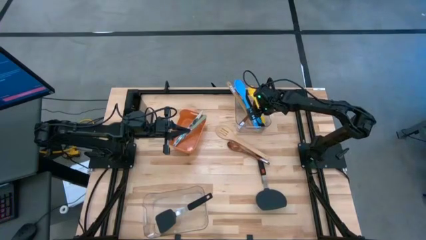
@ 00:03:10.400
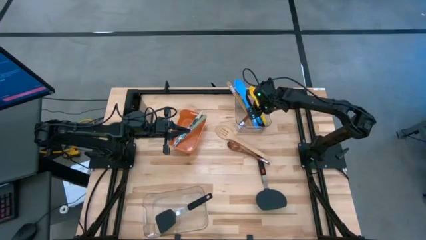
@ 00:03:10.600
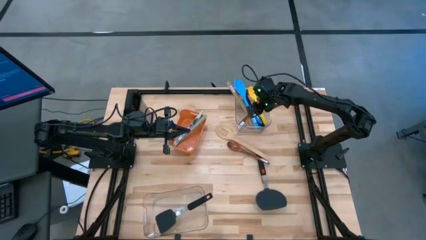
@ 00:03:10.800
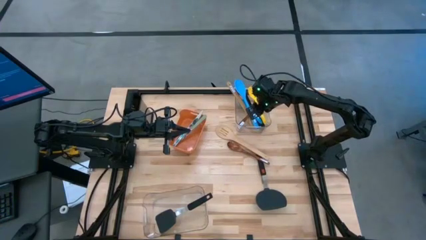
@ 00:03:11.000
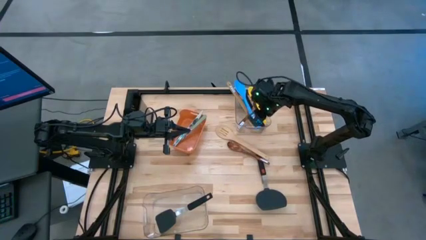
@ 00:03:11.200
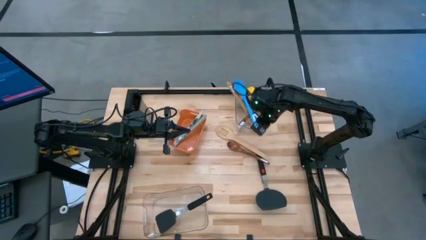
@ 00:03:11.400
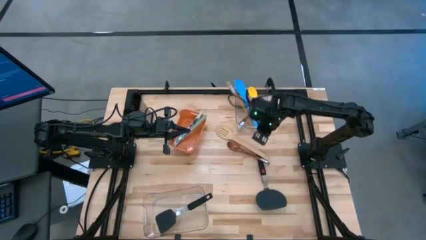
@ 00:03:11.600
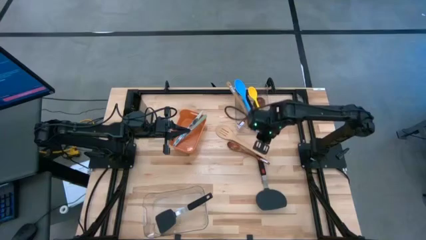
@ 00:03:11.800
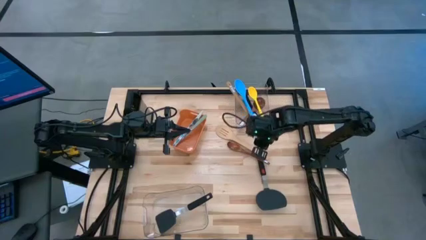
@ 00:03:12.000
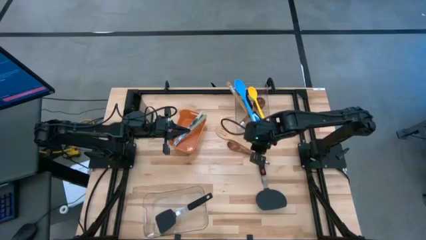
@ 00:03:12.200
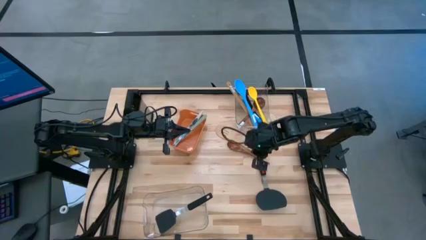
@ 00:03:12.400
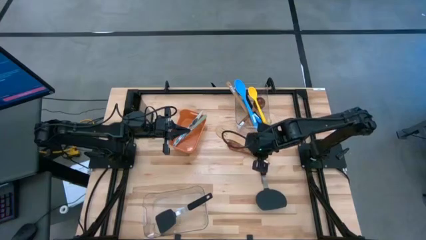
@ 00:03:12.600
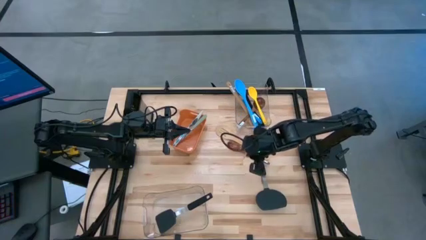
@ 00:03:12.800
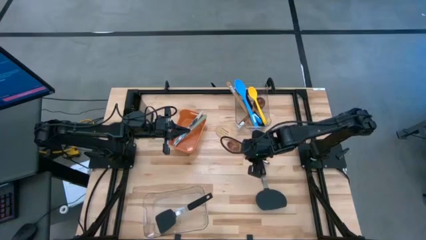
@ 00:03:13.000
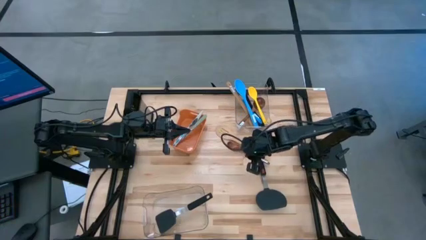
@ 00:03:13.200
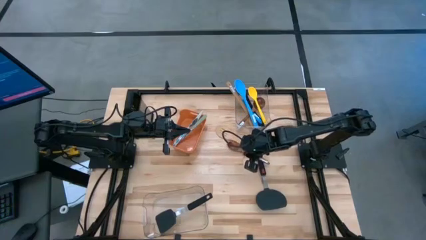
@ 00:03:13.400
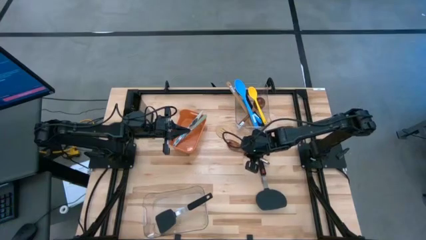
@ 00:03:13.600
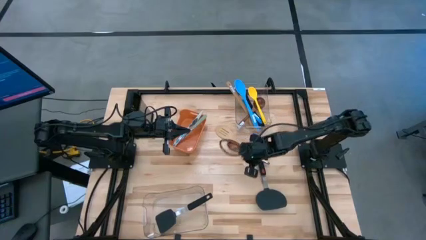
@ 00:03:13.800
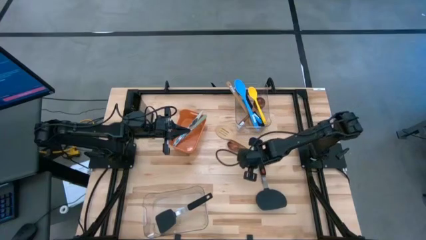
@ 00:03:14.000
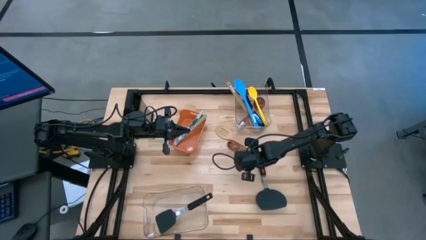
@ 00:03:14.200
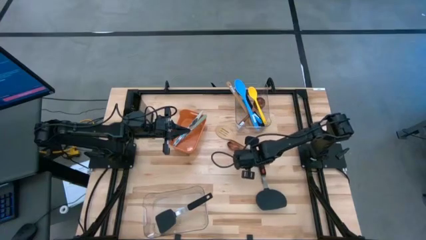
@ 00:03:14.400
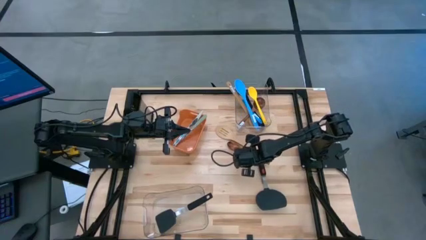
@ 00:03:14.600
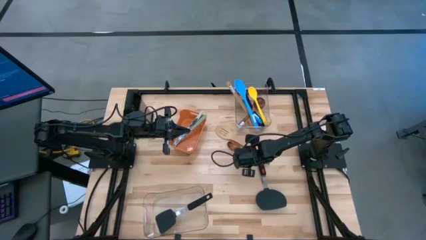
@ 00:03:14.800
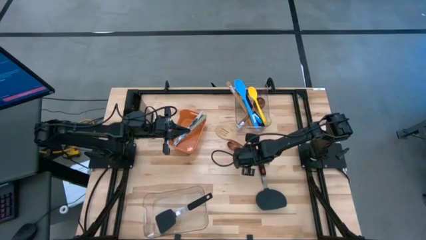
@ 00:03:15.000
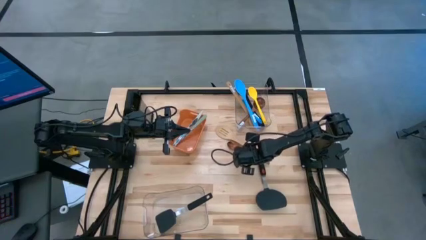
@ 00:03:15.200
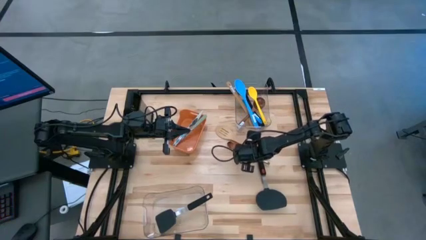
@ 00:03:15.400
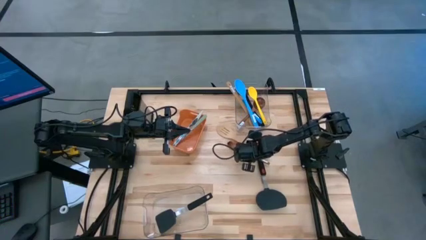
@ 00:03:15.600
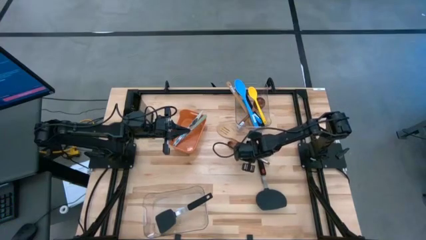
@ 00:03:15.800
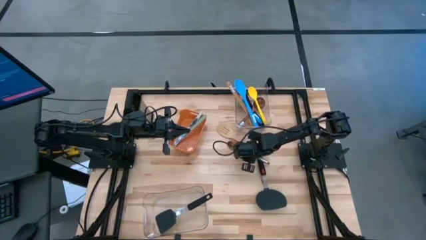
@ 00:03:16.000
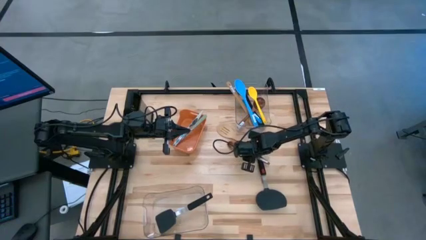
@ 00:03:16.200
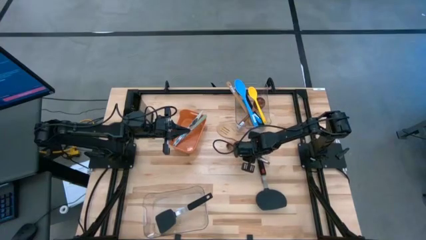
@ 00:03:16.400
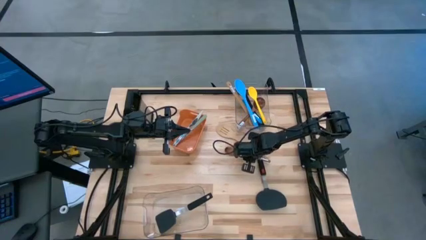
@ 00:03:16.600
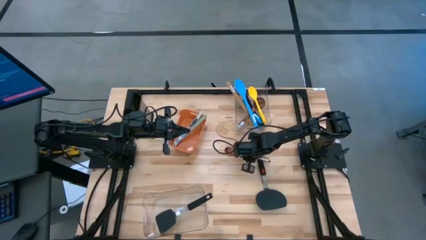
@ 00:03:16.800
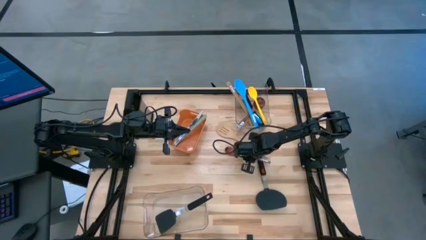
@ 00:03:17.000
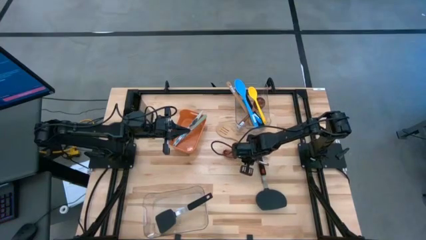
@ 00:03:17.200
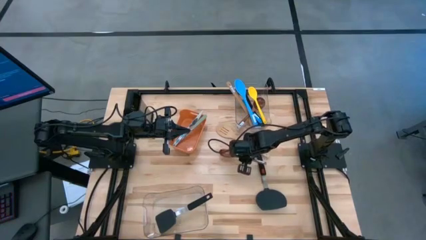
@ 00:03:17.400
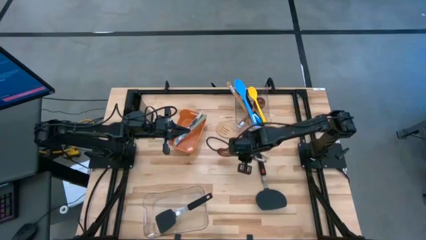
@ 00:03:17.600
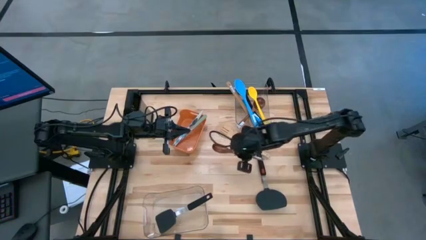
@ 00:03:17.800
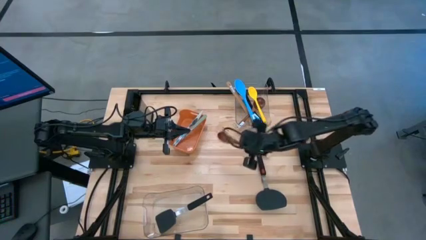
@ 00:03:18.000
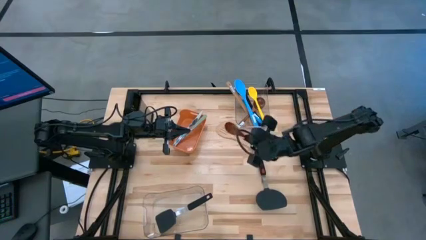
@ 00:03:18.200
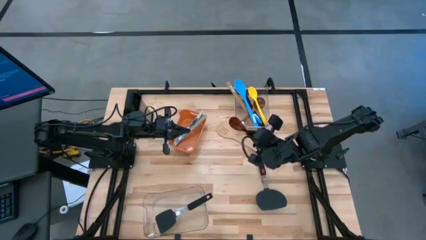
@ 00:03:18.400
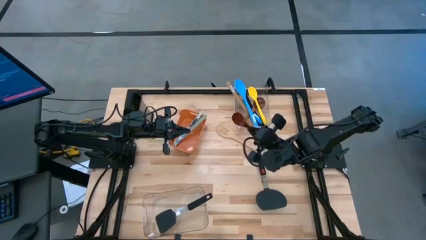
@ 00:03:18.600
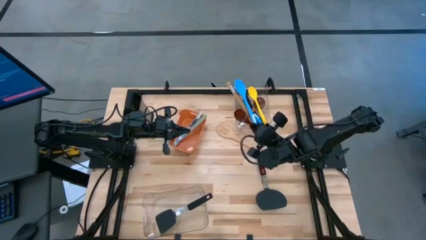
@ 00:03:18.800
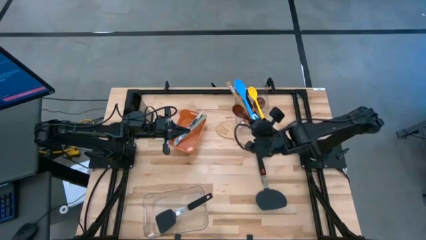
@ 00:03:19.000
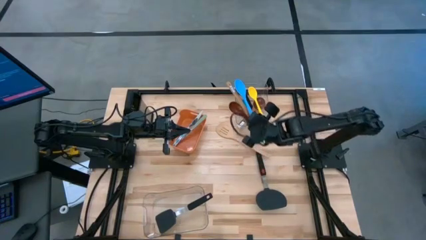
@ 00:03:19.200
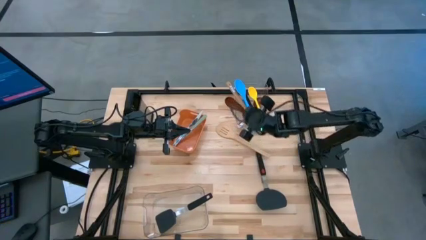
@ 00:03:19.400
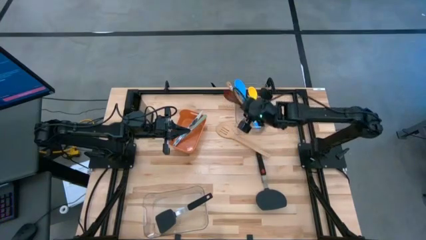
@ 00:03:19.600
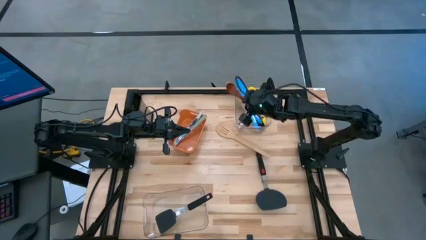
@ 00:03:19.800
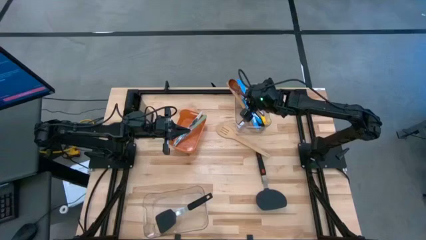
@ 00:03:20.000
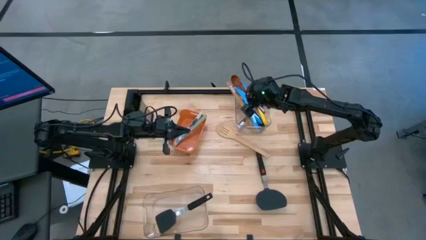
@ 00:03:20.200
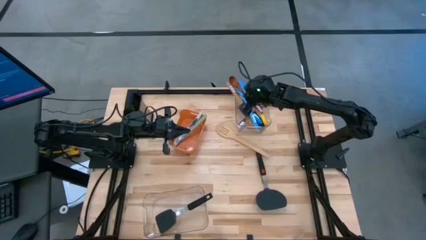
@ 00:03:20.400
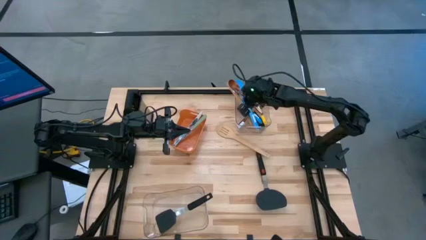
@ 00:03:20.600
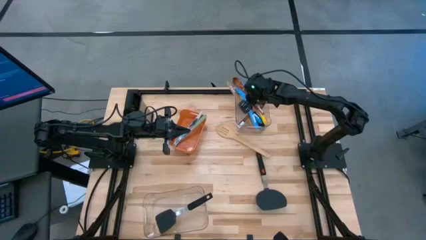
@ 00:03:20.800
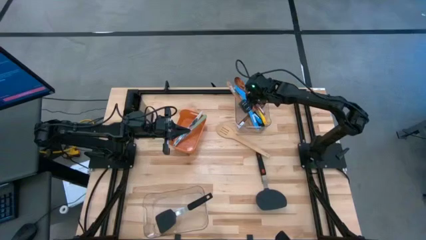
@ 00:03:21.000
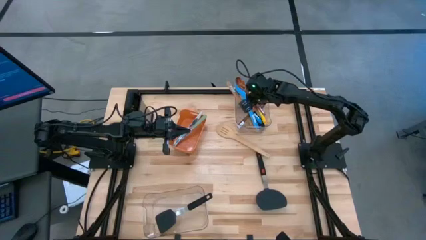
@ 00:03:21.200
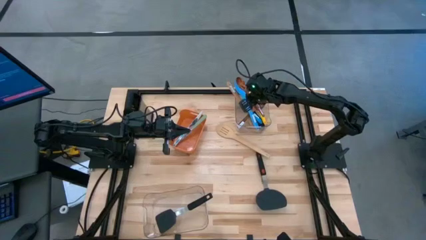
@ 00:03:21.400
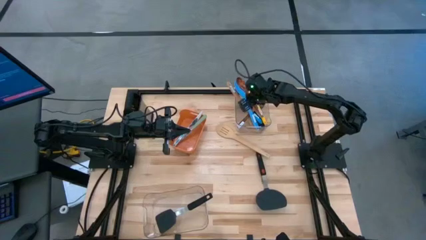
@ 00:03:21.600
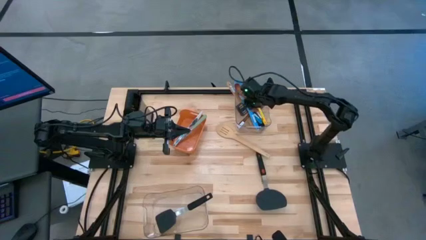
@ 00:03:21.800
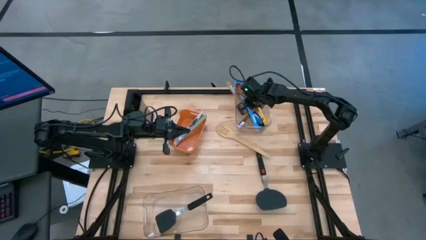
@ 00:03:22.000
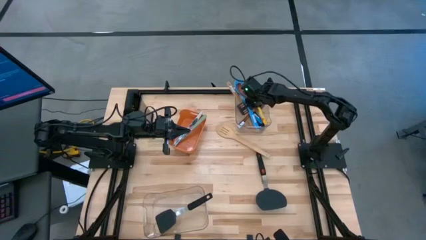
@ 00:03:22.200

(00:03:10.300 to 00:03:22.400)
Task: Pick & Place Kitchen Items
Put the dark brown serving spoon into the top transparent bin

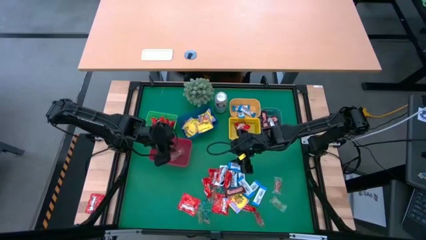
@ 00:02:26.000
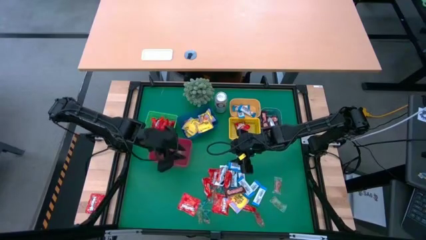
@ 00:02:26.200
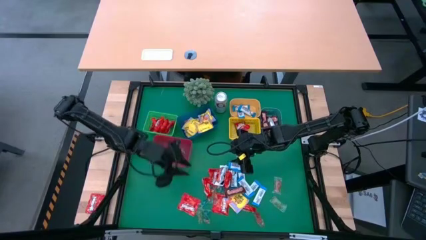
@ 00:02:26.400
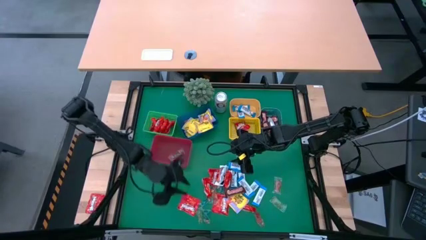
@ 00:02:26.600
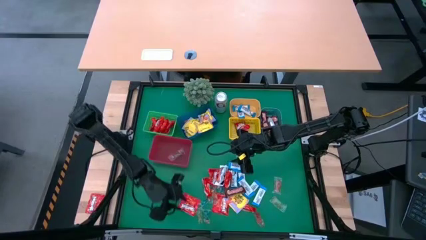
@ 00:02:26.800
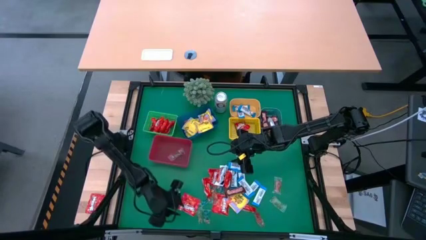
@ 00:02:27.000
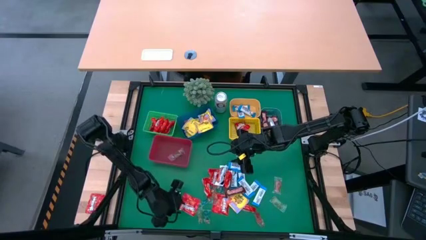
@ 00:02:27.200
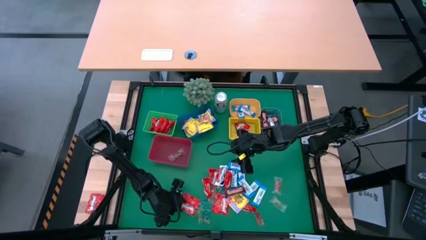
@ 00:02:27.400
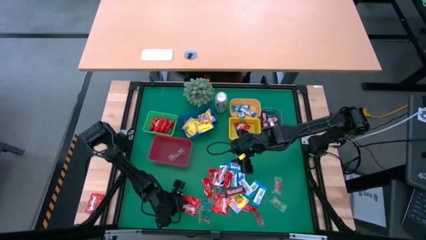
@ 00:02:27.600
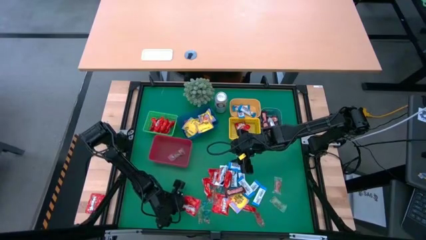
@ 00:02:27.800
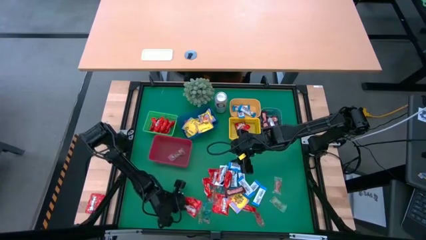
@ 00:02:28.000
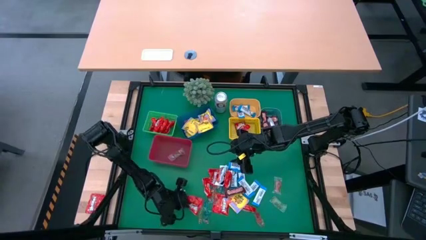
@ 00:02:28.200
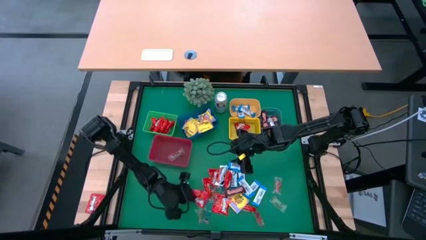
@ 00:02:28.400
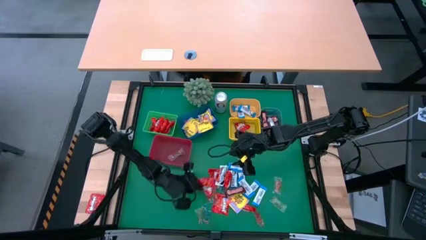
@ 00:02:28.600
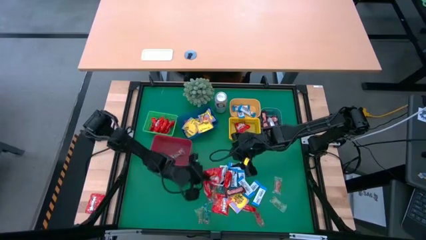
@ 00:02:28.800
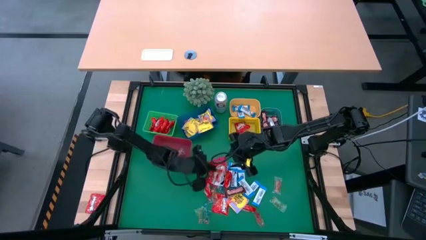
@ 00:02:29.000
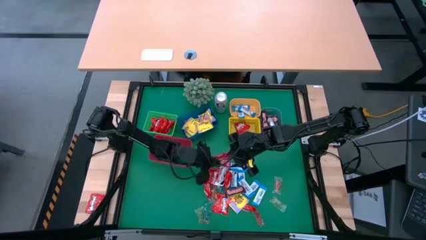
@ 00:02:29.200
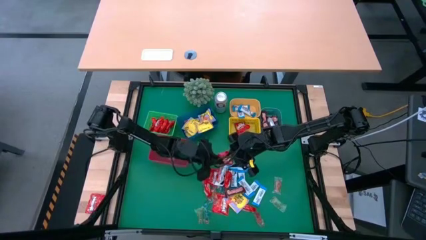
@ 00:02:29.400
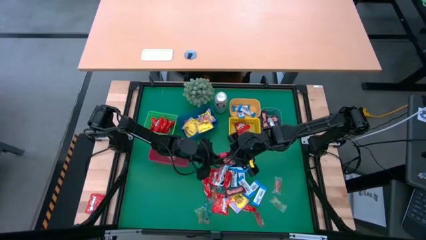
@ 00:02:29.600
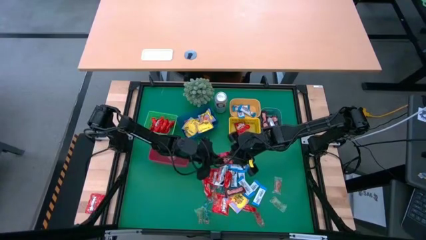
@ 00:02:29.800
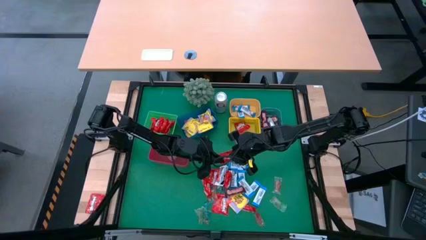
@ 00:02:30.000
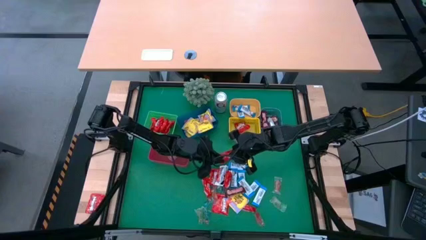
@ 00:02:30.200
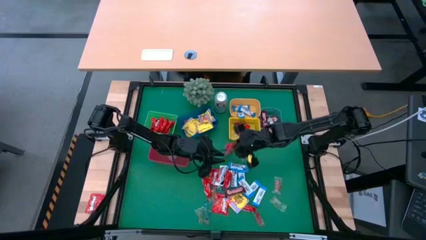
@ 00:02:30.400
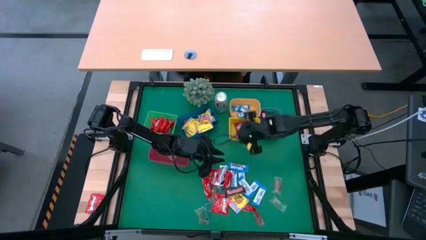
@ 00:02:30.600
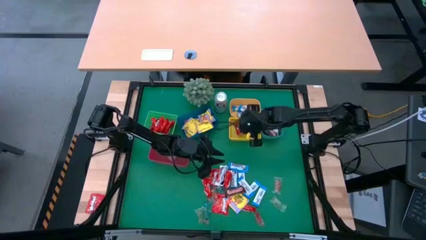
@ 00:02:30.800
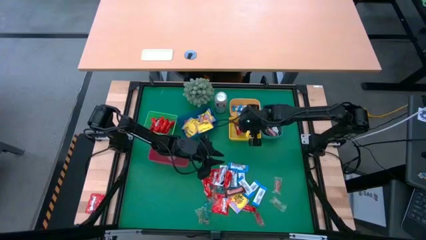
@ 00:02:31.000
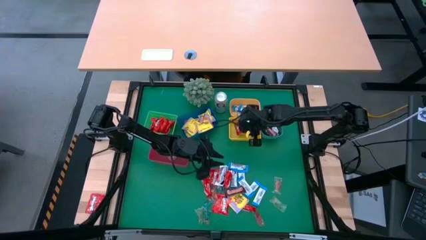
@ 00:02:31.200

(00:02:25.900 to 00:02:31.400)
Task: Sort candy
Put the red candy pack into the yellow bin
